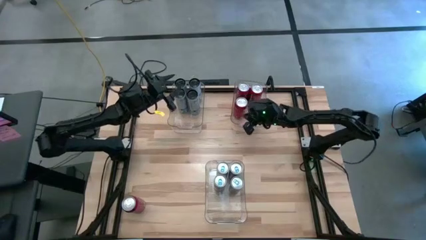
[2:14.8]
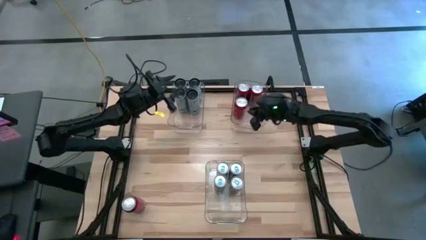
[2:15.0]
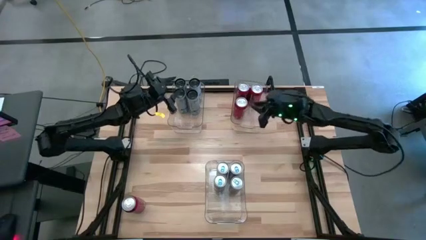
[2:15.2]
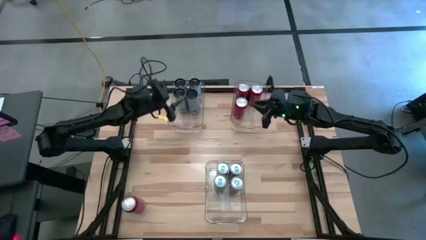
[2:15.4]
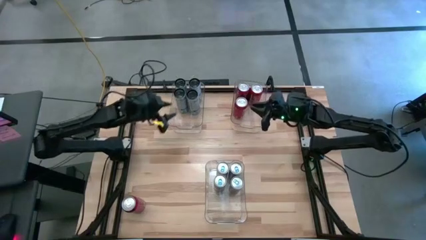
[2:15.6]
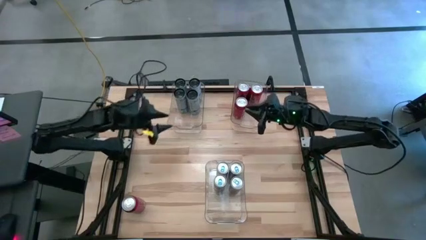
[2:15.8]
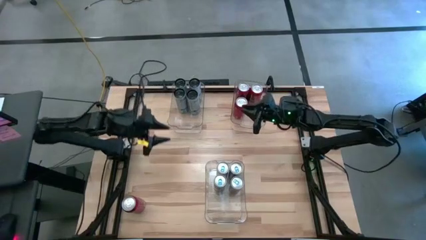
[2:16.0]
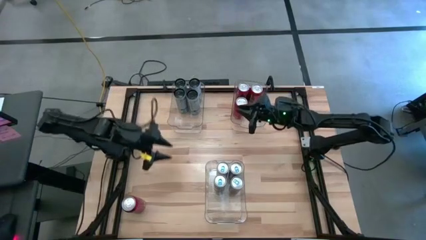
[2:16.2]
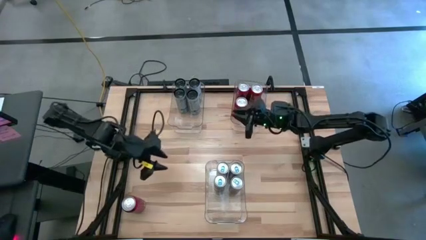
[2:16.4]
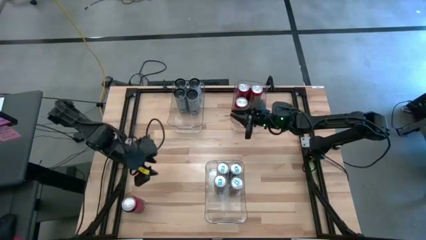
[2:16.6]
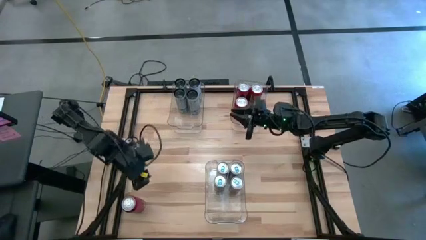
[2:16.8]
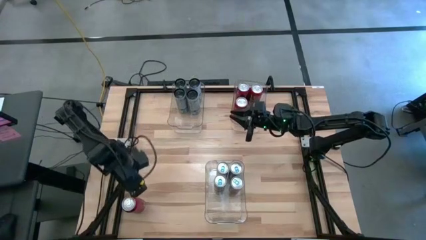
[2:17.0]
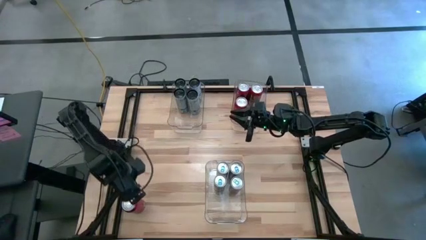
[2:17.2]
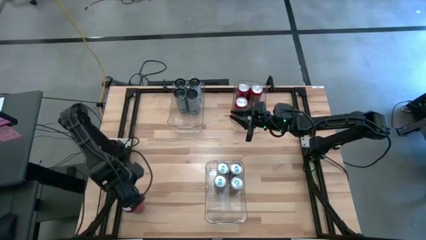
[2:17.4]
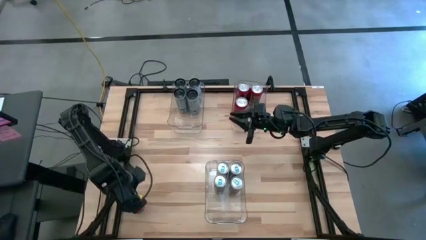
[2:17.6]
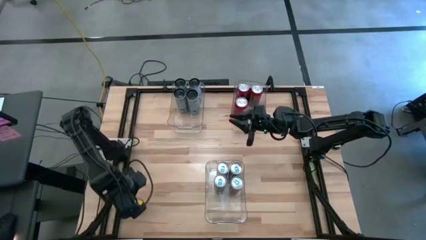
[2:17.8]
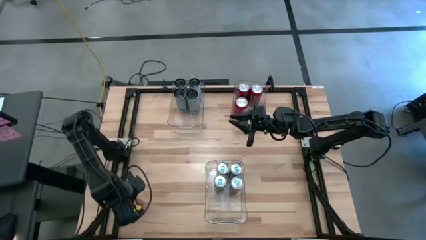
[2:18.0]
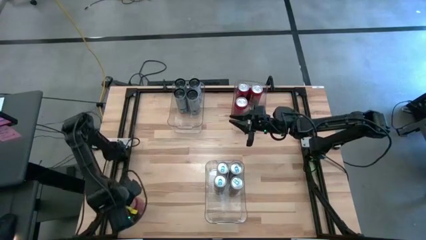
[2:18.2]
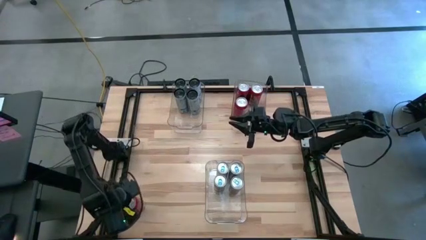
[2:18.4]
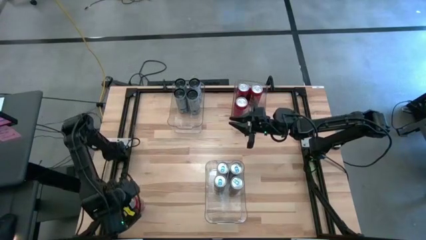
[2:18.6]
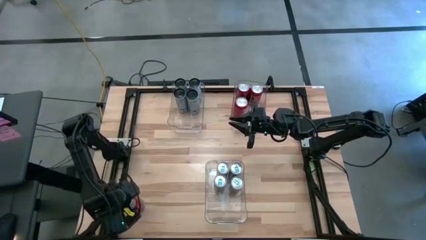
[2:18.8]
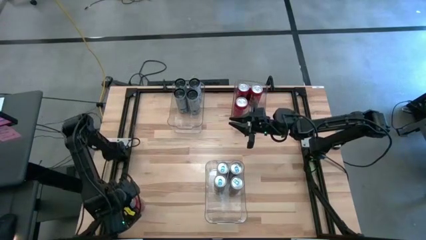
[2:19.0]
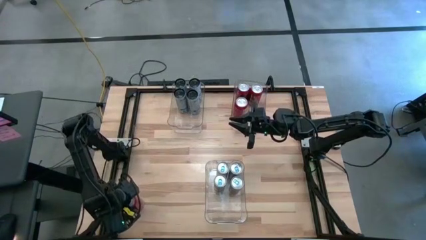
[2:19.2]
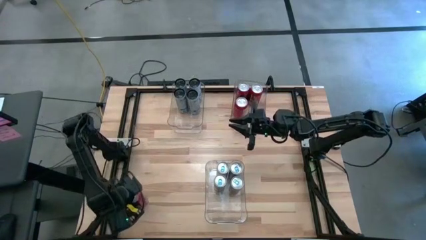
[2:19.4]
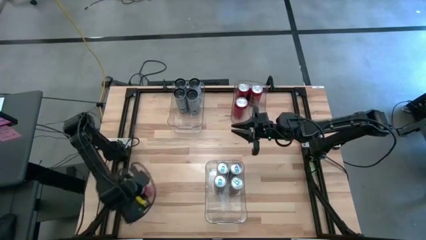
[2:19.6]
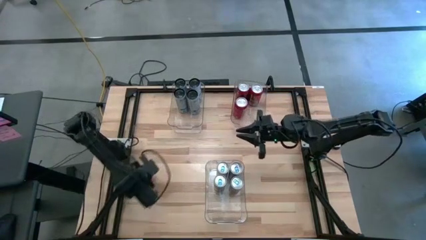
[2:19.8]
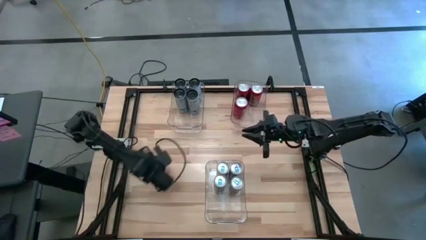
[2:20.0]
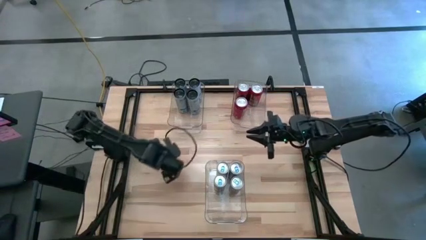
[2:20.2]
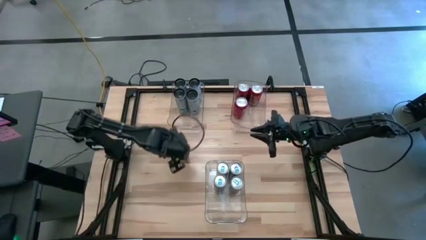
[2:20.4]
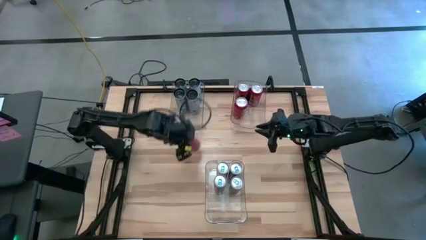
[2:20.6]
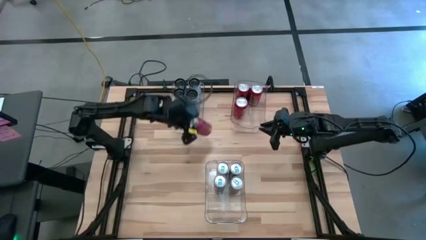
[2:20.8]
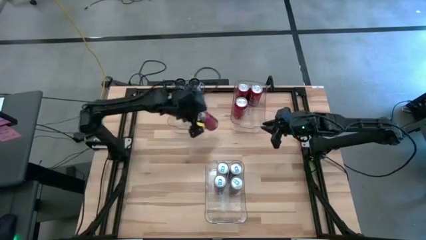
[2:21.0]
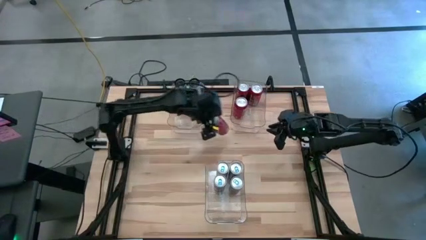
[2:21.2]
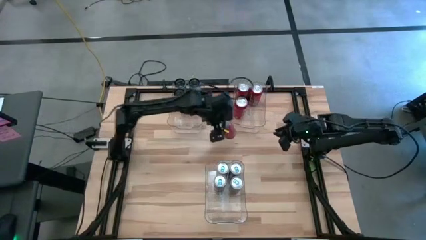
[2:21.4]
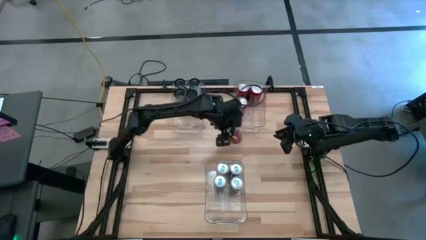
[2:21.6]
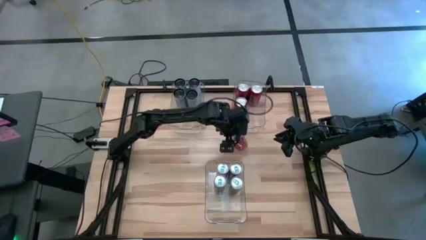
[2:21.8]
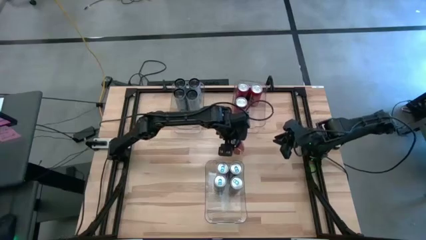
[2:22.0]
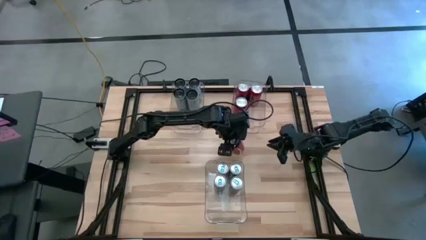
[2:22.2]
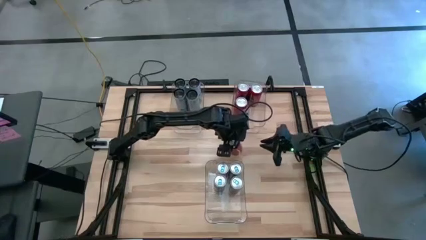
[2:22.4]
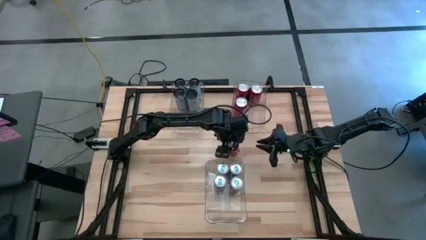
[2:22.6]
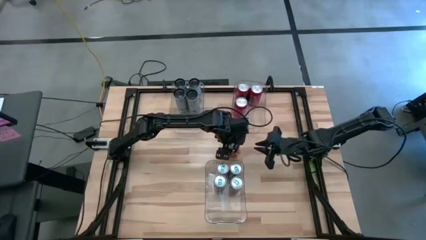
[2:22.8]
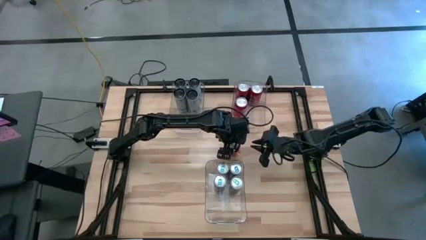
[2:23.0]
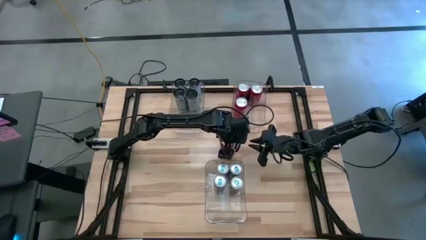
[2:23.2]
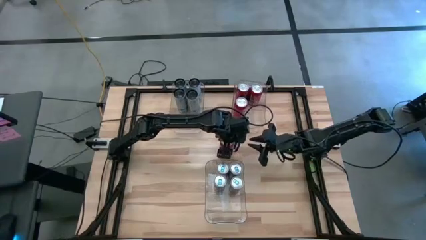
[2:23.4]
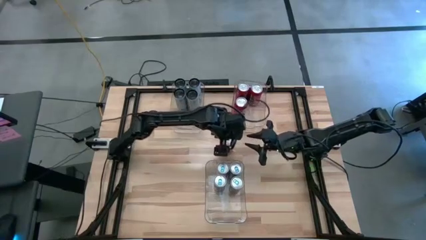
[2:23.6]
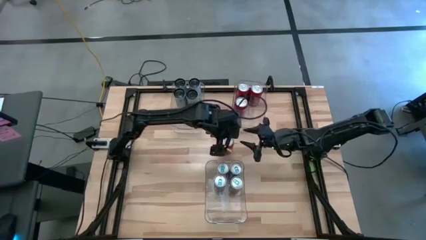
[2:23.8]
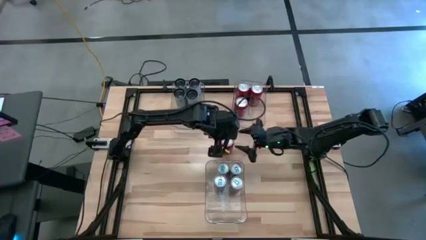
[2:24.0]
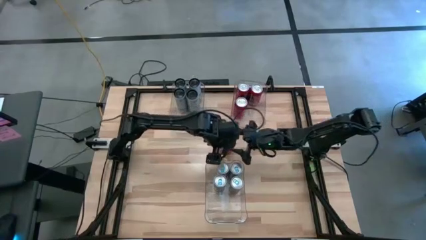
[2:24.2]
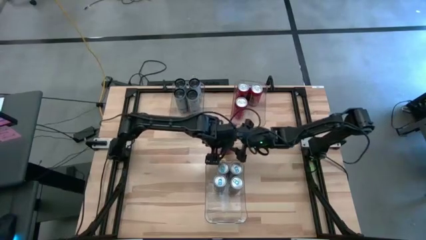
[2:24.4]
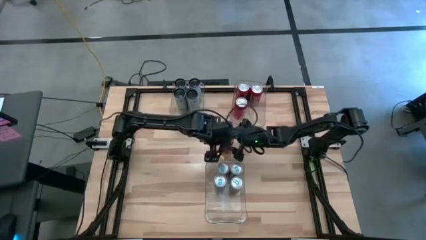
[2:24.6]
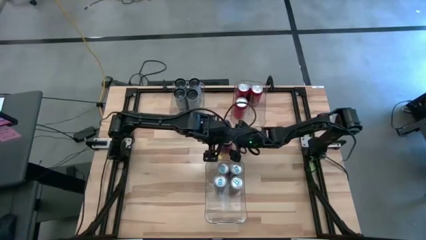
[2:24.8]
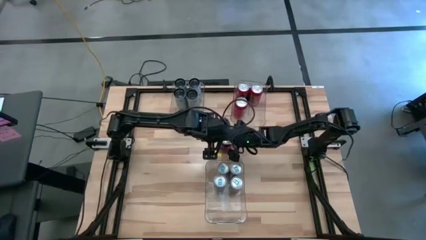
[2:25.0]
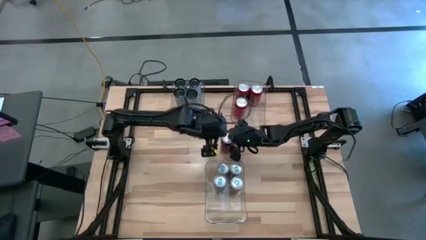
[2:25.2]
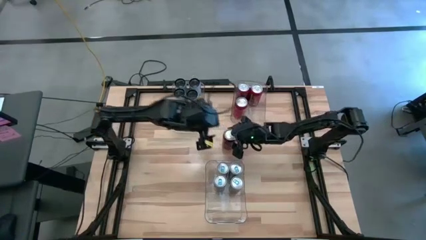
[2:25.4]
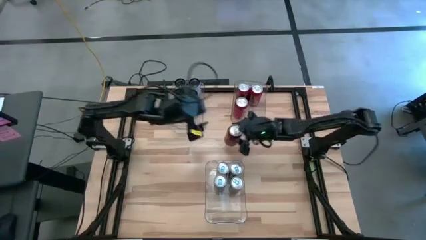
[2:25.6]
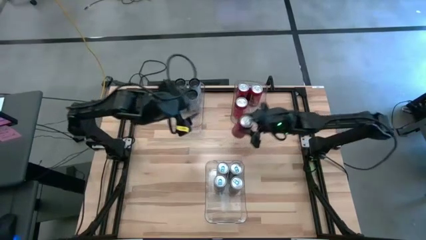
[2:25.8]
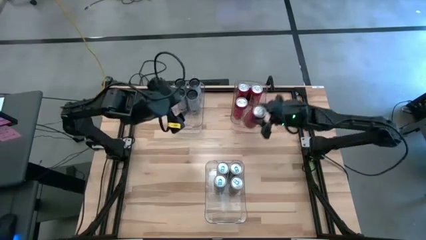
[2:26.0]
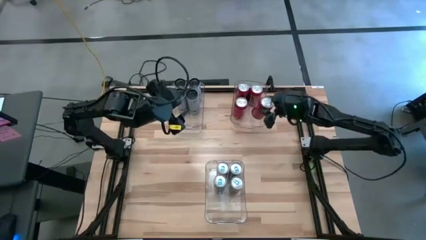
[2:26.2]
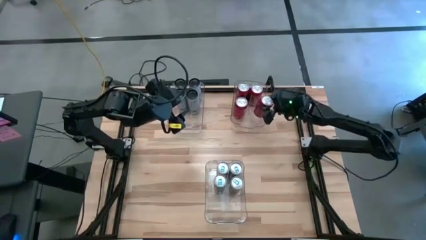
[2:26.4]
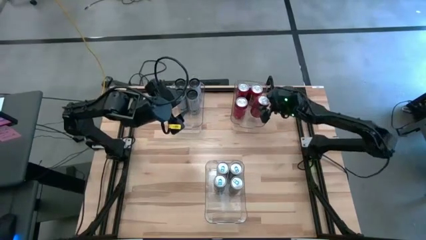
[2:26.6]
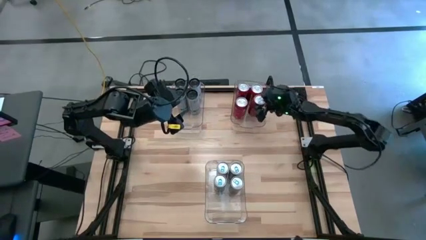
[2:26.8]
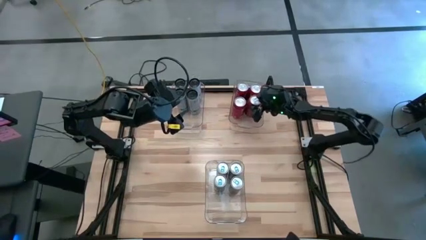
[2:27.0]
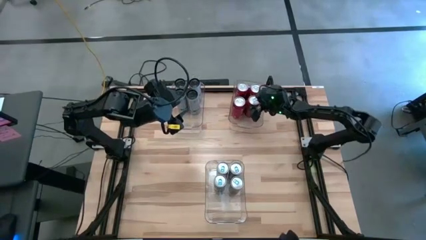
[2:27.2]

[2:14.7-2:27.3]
Task: Sort soda cans
Put the red soda can into the right transparent bin

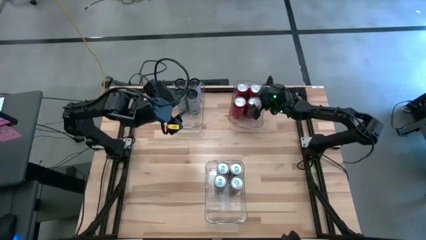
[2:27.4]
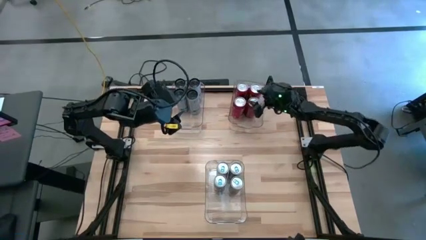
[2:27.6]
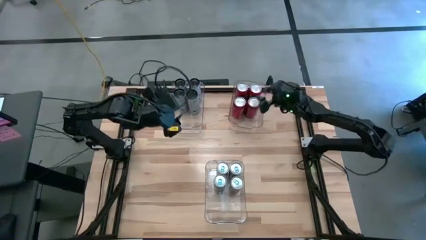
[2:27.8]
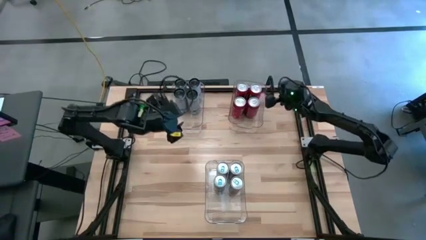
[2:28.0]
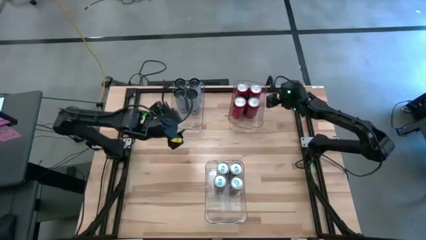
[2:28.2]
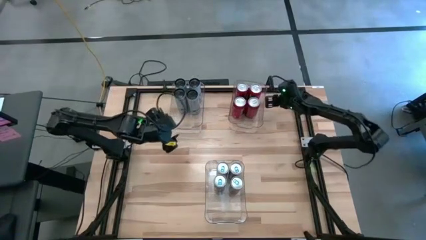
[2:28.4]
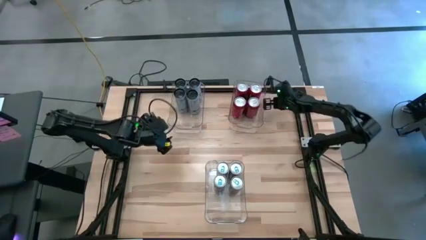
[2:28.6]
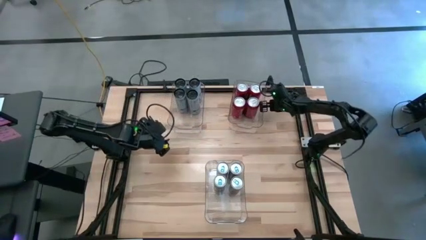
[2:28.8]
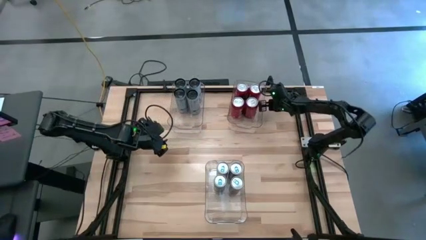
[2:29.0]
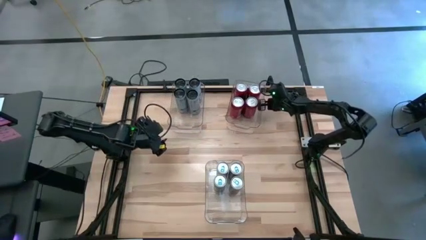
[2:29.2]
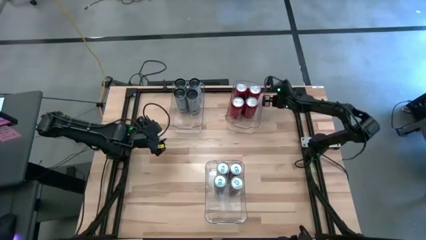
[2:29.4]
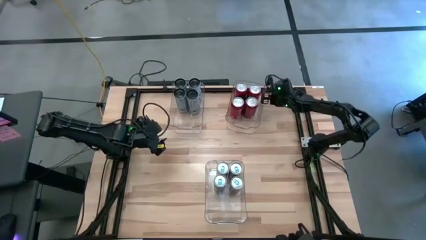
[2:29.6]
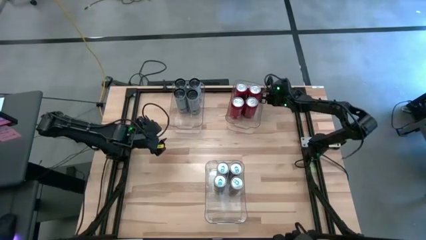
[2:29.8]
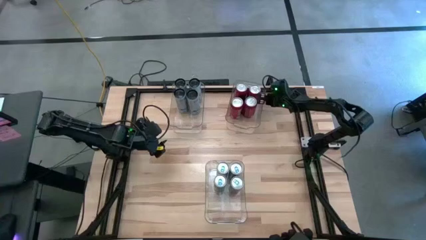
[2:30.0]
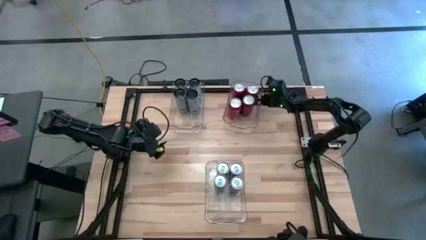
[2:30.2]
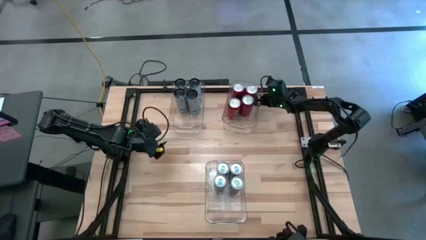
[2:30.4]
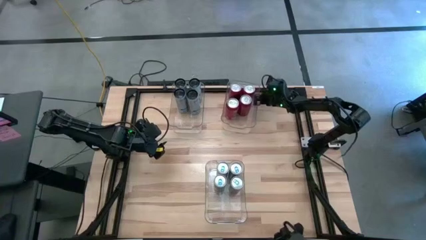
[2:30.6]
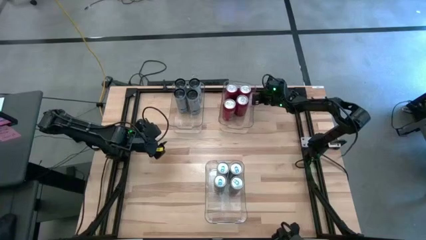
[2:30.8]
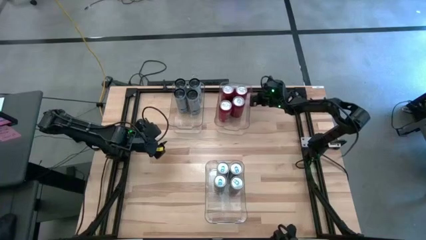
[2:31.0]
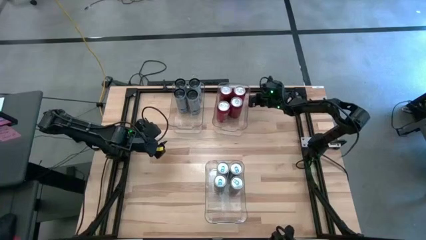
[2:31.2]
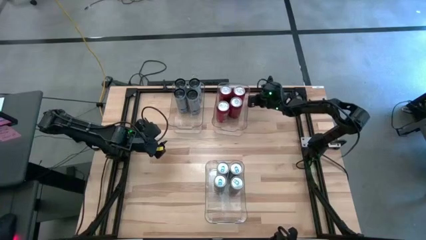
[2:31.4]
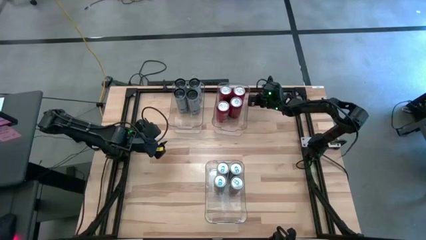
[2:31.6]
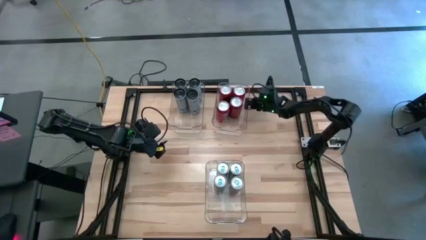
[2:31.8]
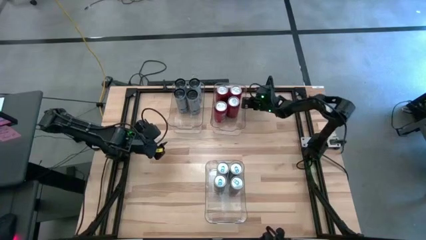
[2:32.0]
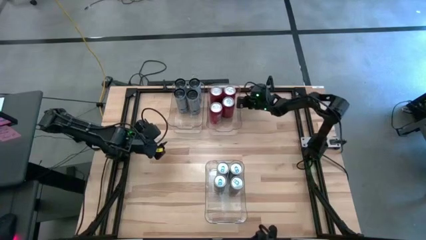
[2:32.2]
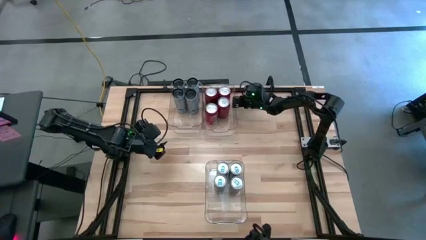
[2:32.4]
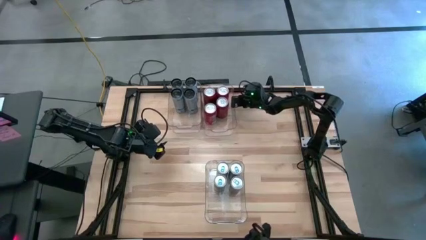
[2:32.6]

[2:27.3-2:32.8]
Move the top right transparent bin to the top center of the table
